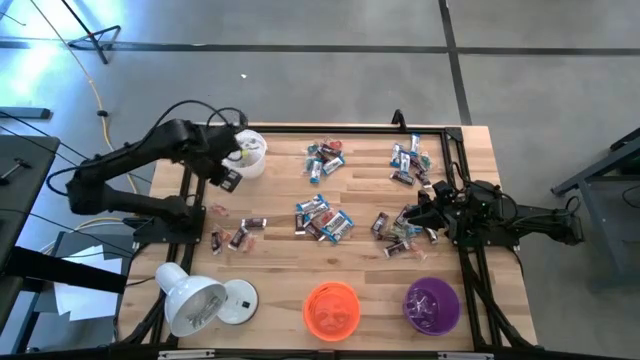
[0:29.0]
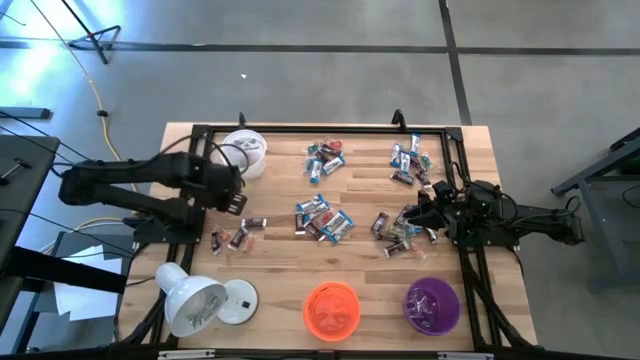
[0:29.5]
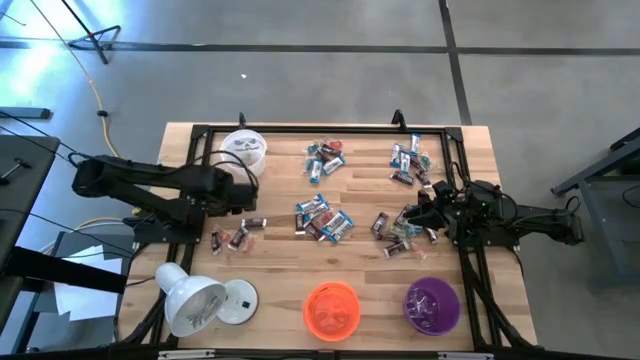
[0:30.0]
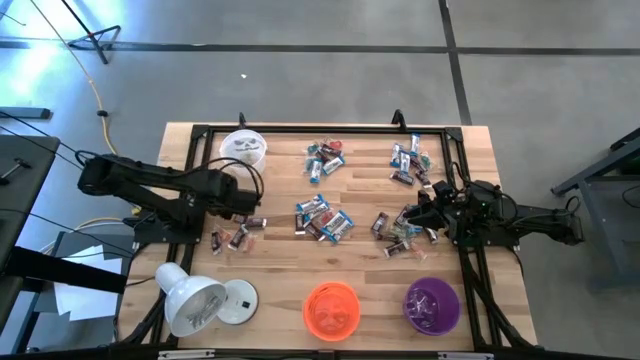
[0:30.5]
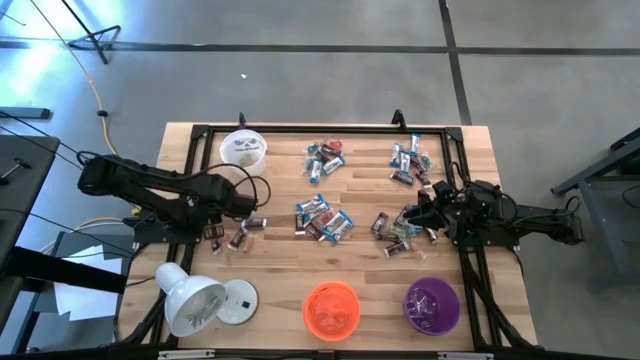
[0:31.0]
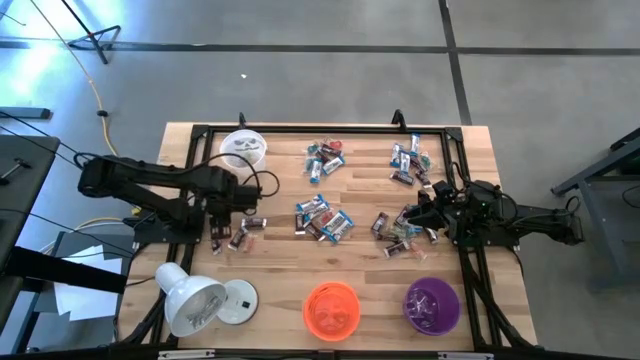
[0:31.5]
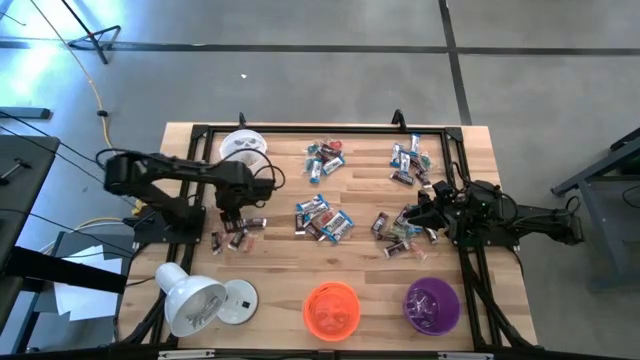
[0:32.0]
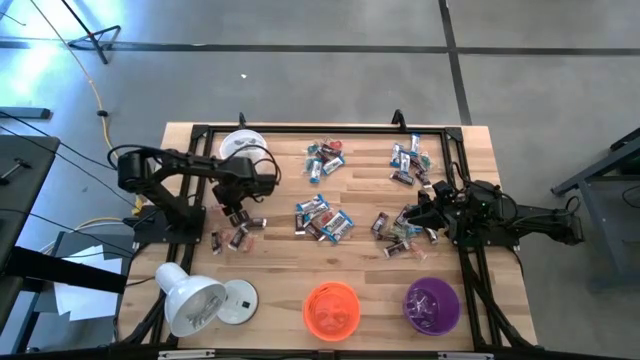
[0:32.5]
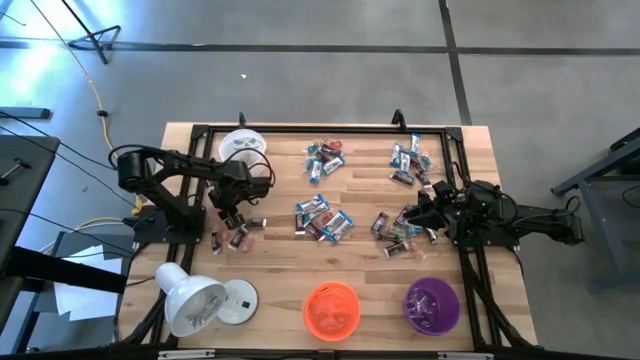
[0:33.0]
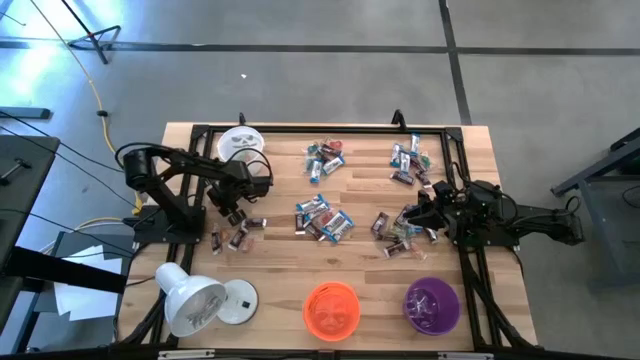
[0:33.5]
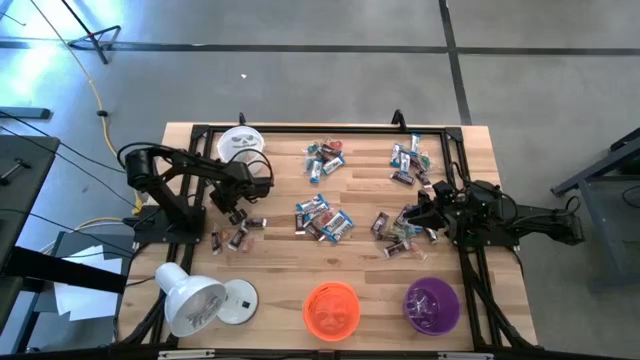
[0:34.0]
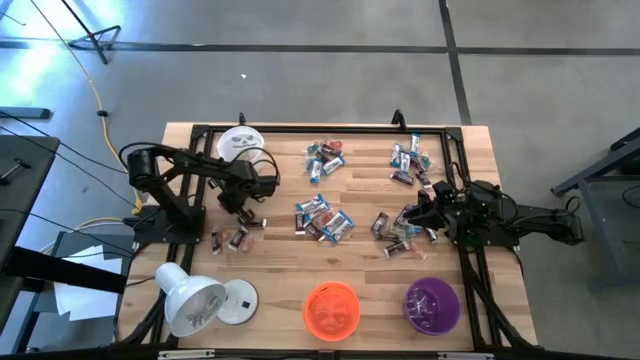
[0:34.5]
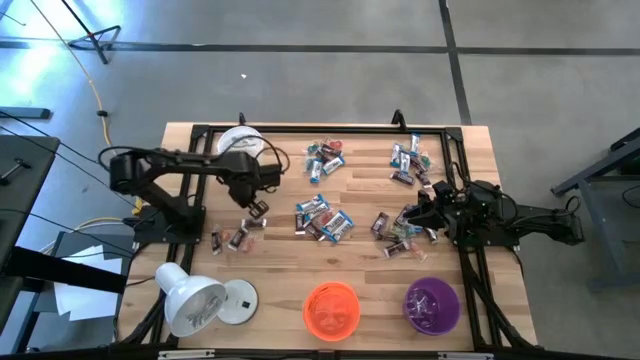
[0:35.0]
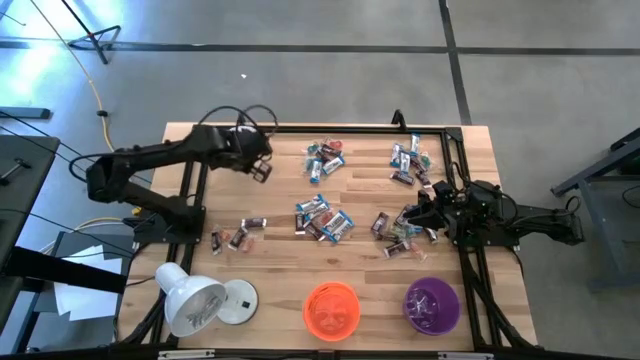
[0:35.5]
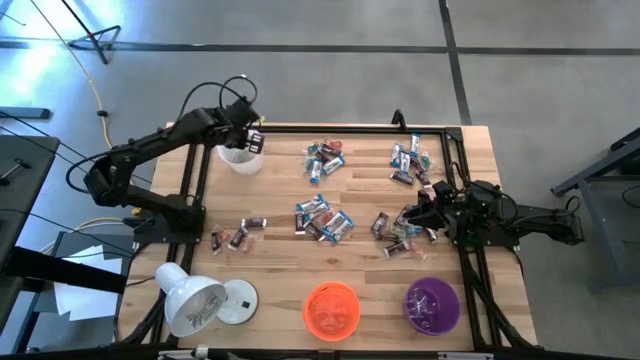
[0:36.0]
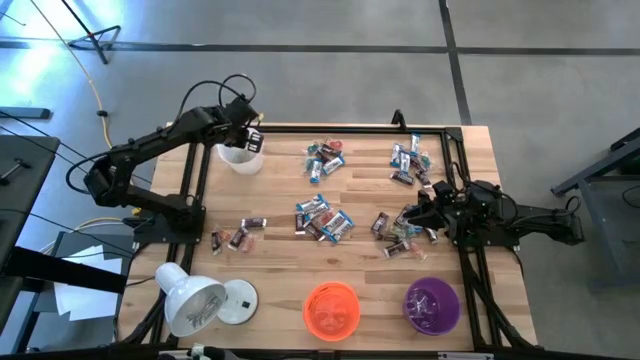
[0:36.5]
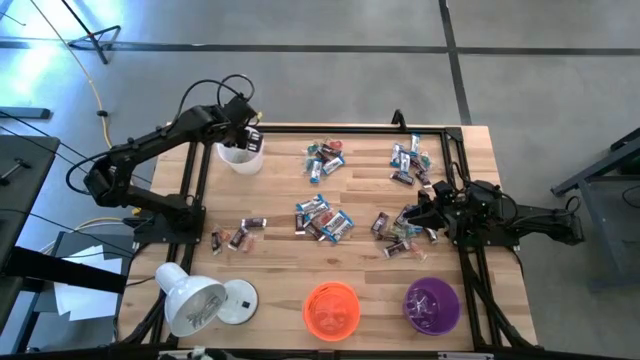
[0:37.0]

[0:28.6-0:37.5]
Task: Organize candy in baskets
Put the red gummy into the white bucket

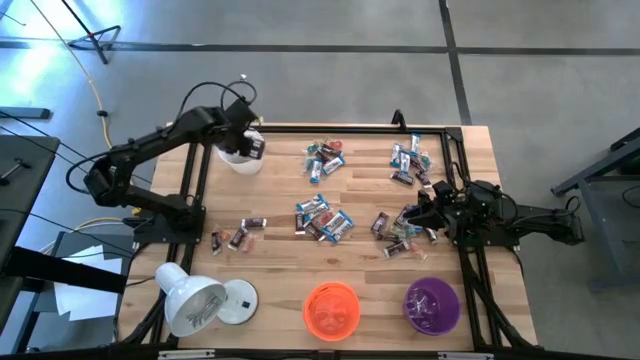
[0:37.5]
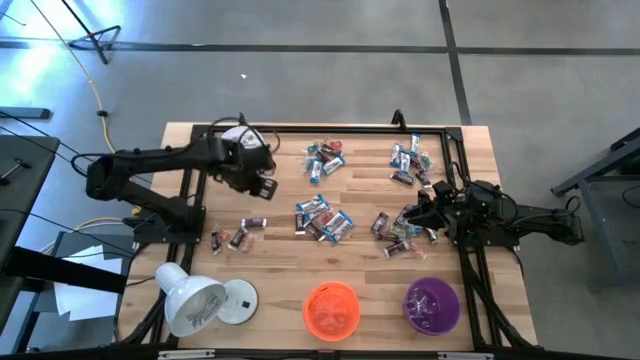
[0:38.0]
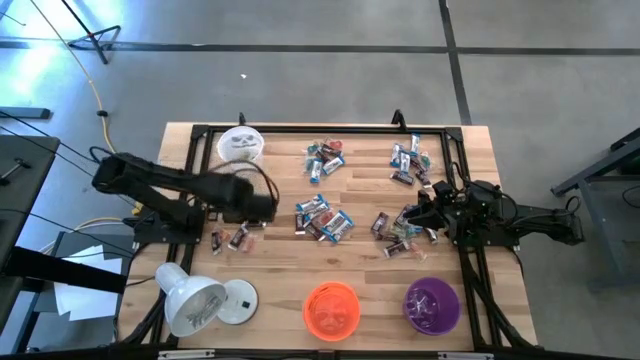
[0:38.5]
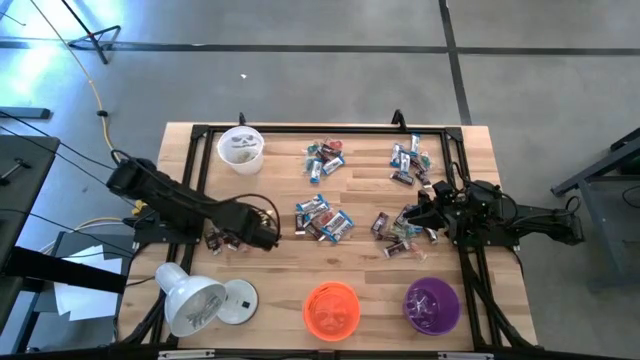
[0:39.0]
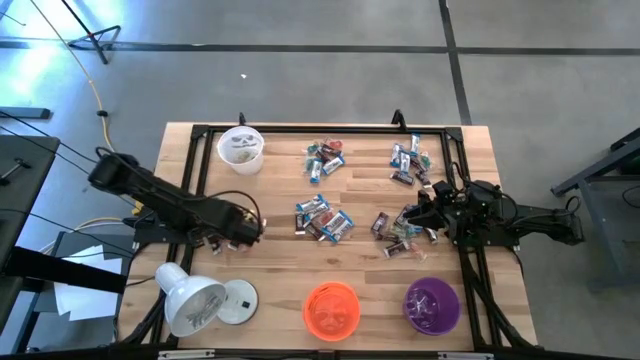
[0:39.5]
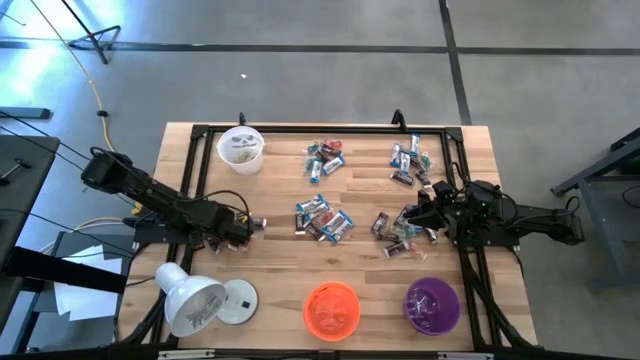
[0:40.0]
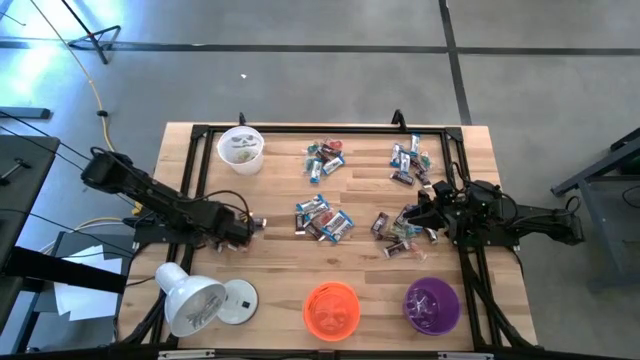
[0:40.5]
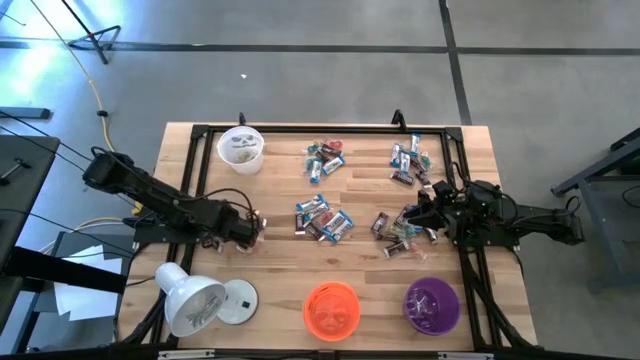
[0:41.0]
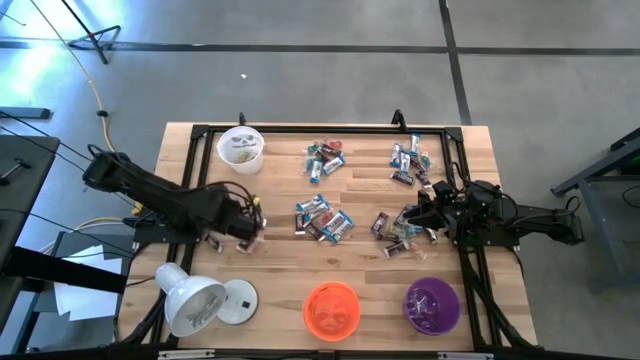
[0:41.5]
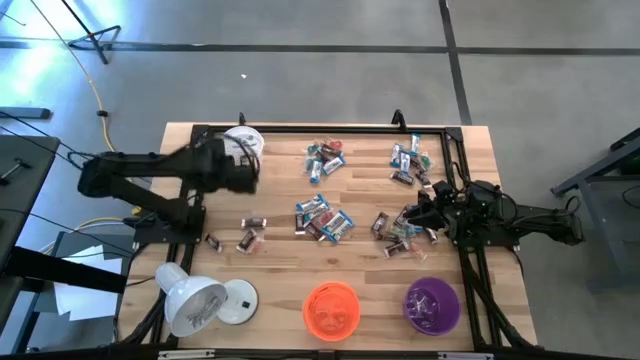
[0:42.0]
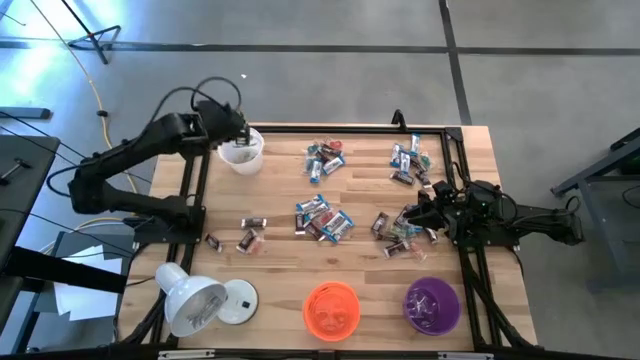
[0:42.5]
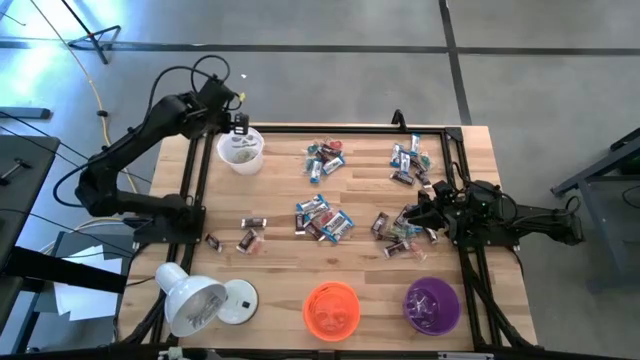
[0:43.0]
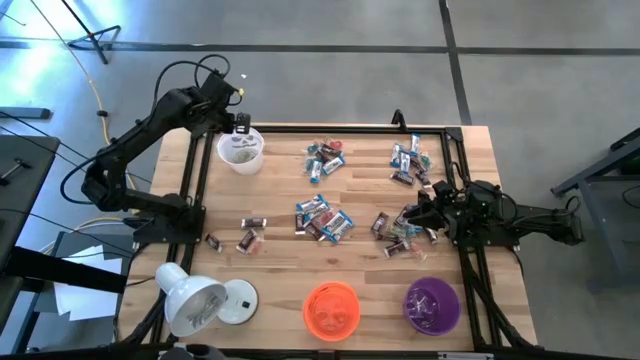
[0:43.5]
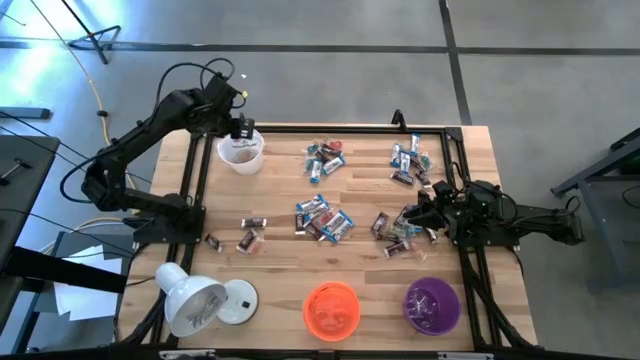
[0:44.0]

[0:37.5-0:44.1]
Put the orange gummy into the white bucket

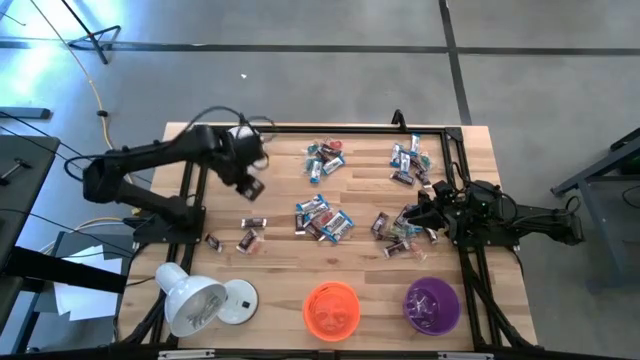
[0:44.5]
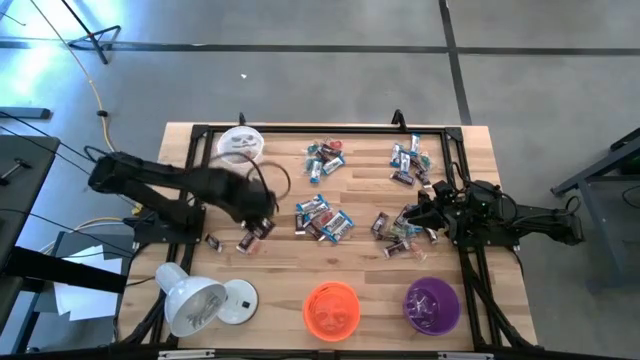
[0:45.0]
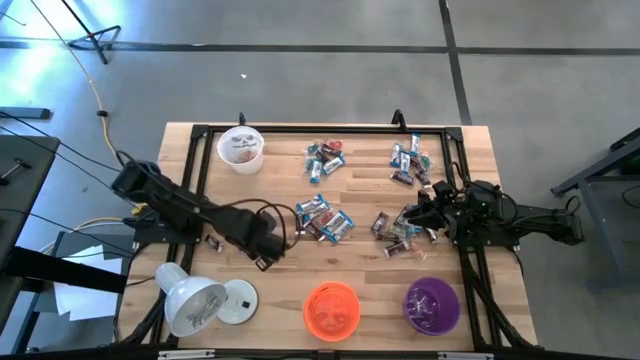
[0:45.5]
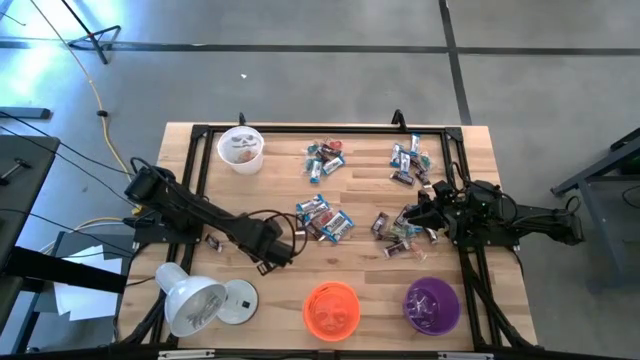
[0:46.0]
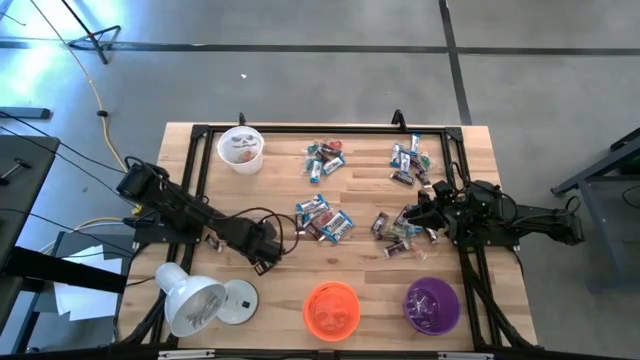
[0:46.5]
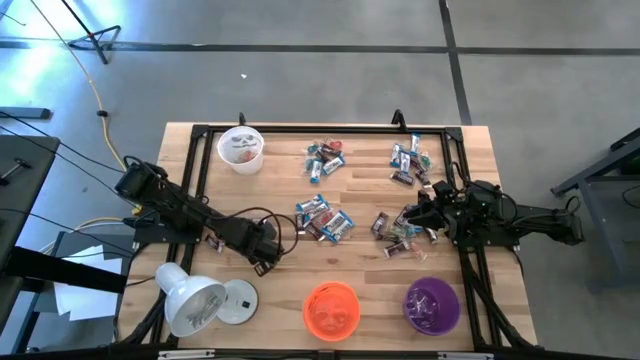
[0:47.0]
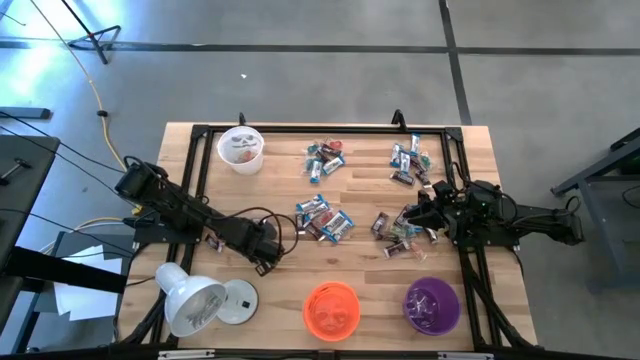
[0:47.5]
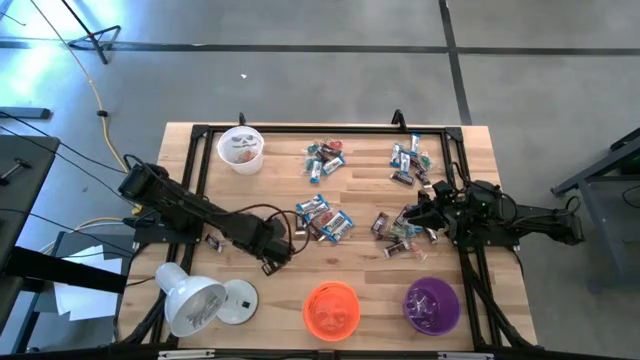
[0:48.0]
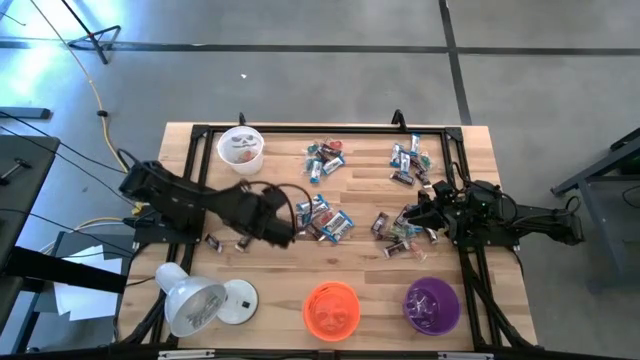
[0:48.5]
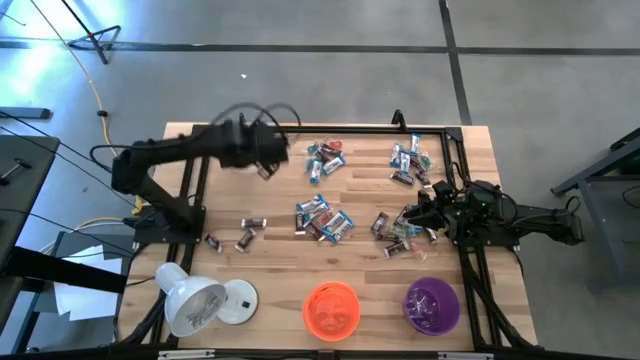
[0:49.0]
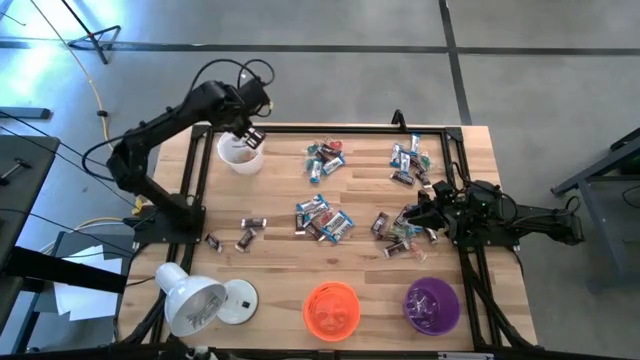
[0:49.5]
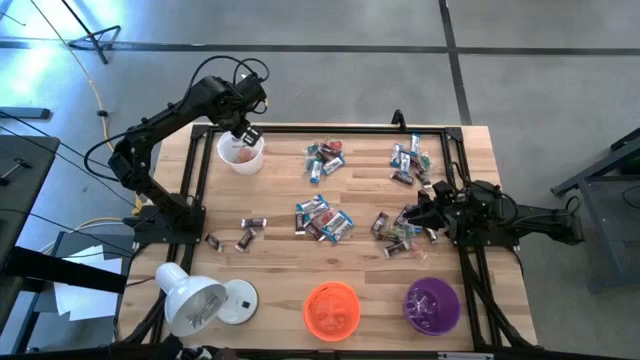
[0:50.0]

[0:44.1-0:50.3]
Put the orange gummy into the white bucket
